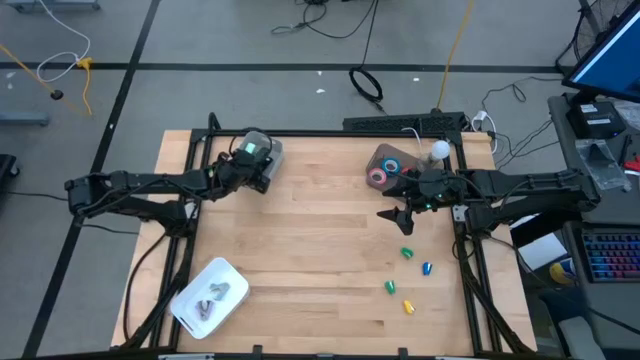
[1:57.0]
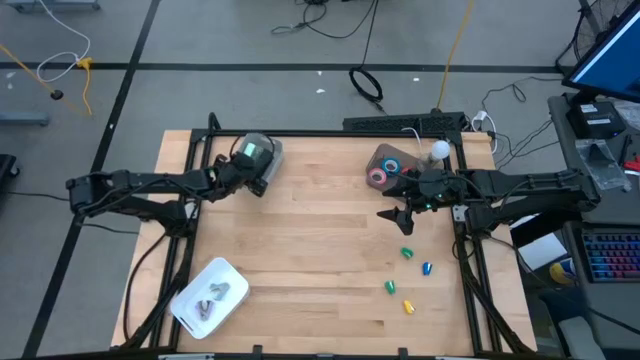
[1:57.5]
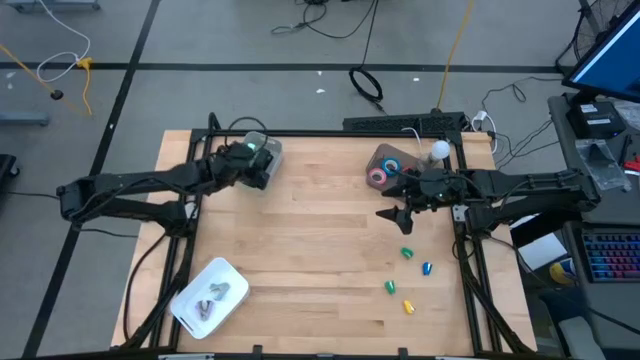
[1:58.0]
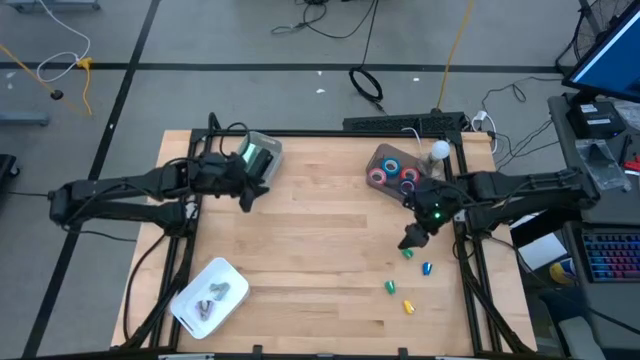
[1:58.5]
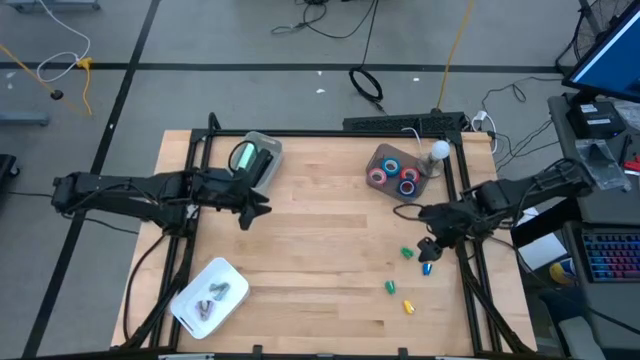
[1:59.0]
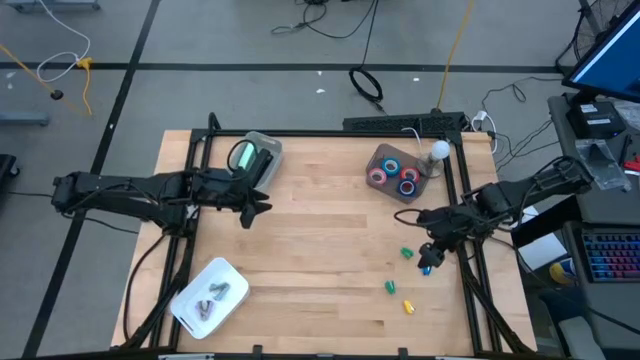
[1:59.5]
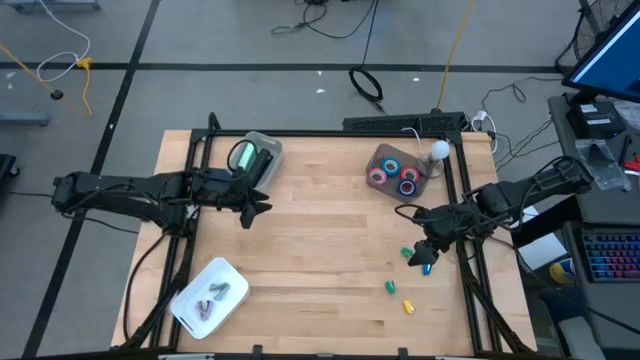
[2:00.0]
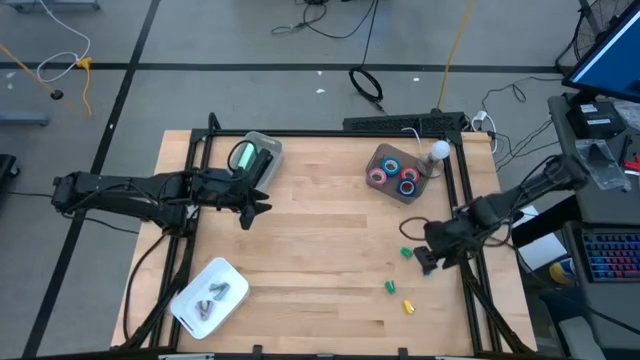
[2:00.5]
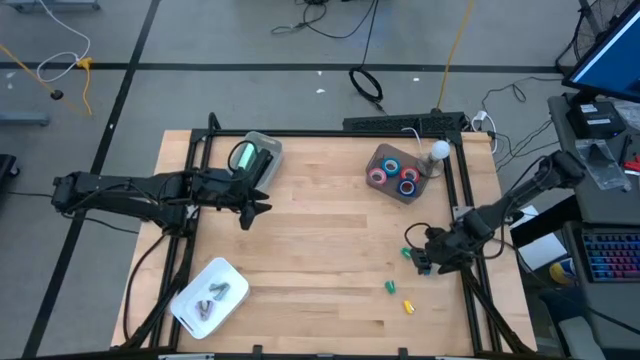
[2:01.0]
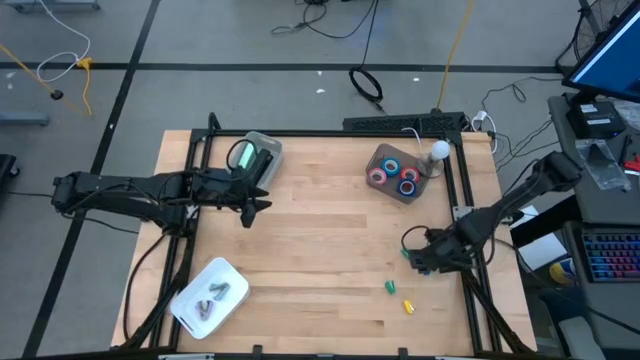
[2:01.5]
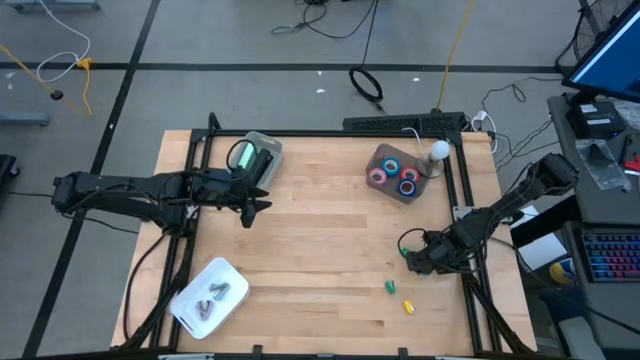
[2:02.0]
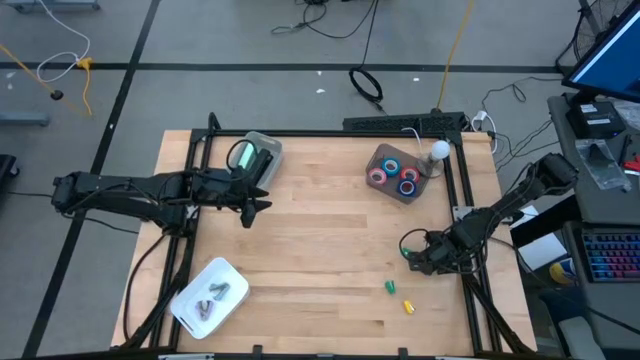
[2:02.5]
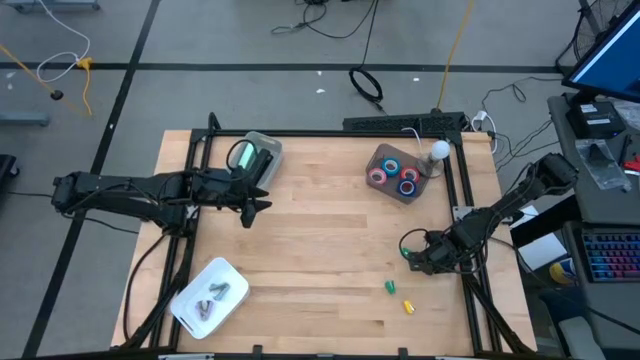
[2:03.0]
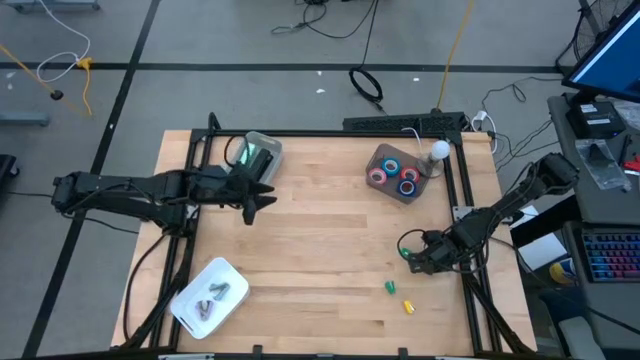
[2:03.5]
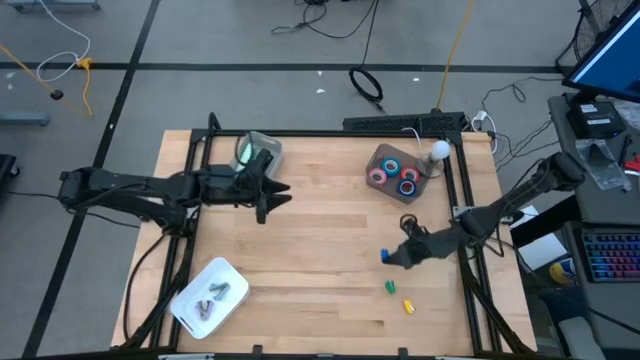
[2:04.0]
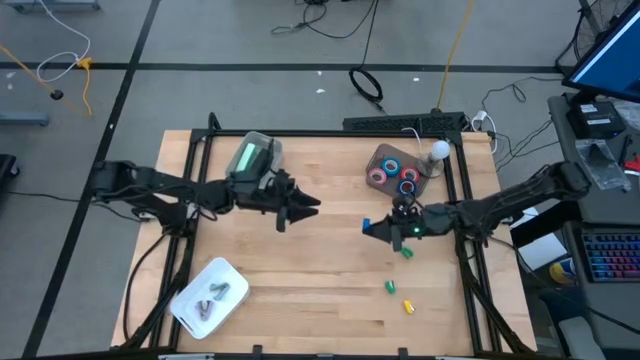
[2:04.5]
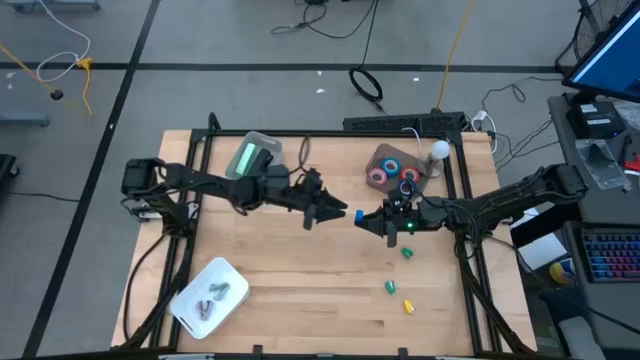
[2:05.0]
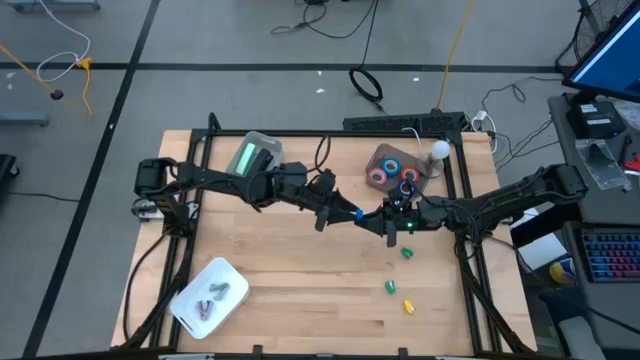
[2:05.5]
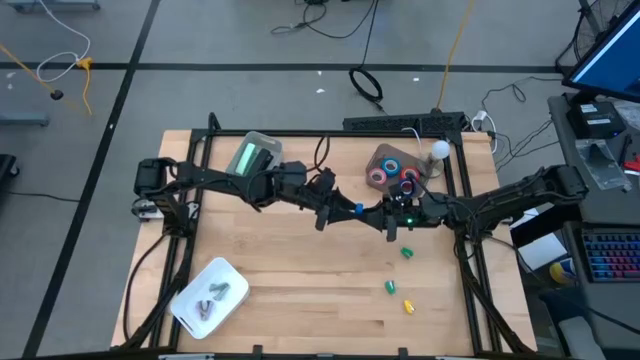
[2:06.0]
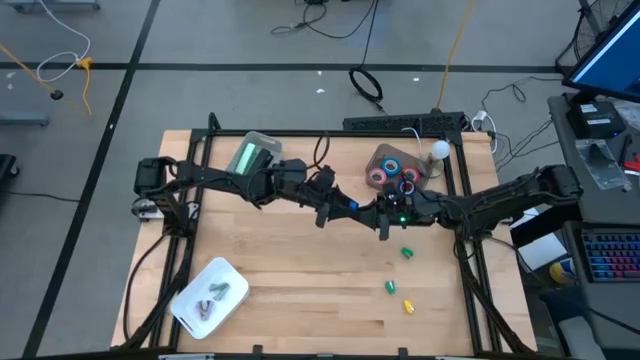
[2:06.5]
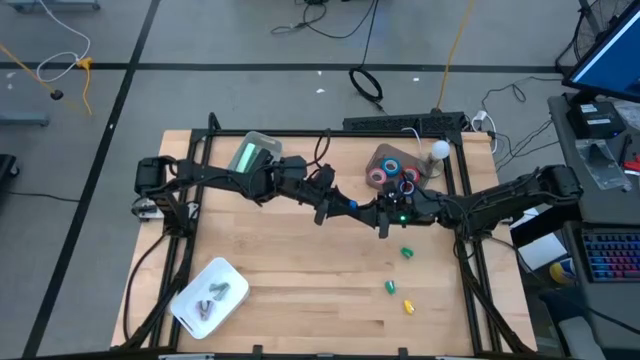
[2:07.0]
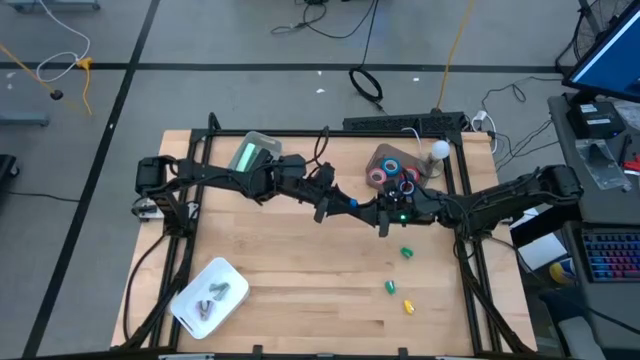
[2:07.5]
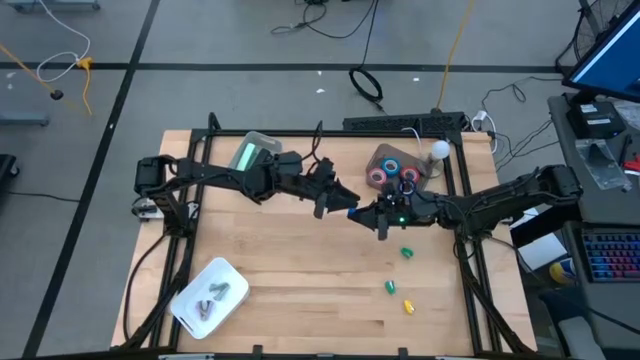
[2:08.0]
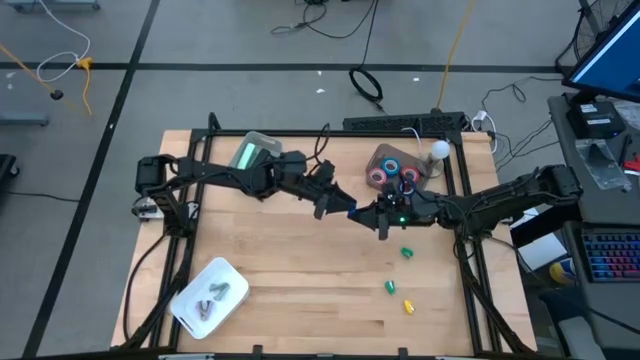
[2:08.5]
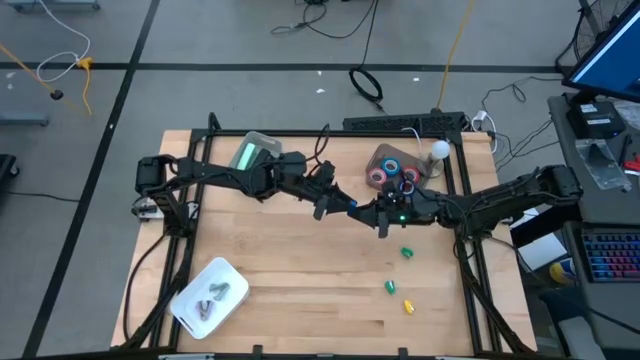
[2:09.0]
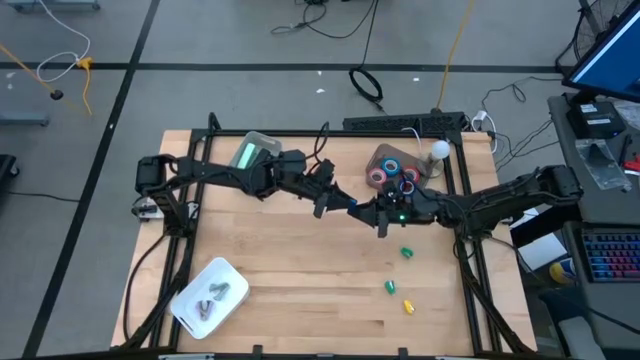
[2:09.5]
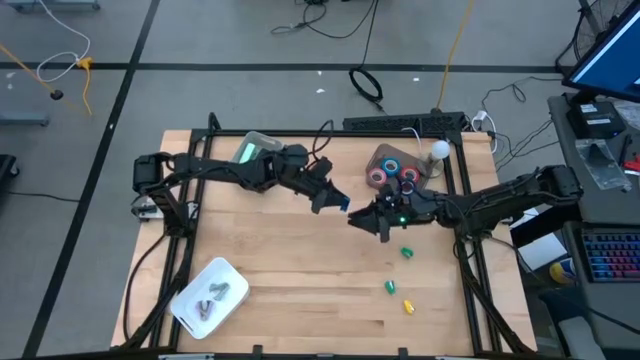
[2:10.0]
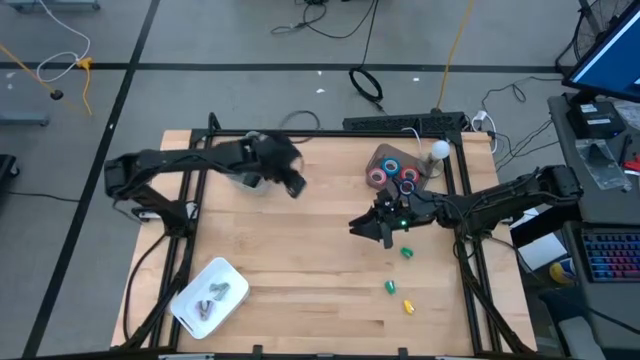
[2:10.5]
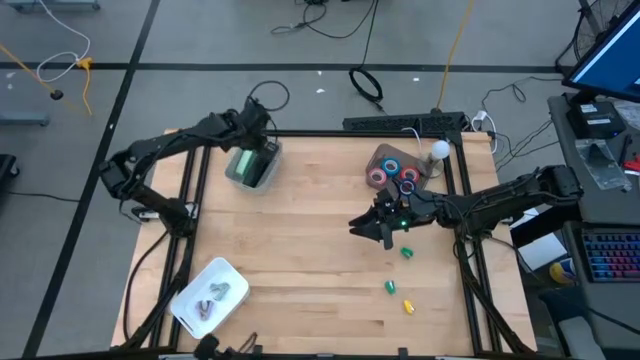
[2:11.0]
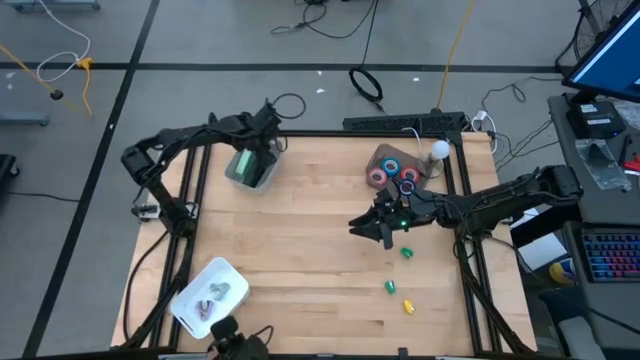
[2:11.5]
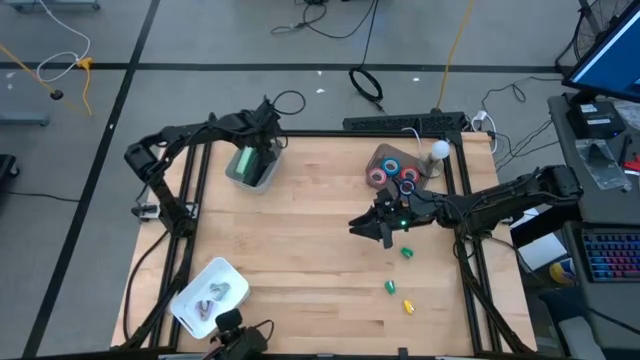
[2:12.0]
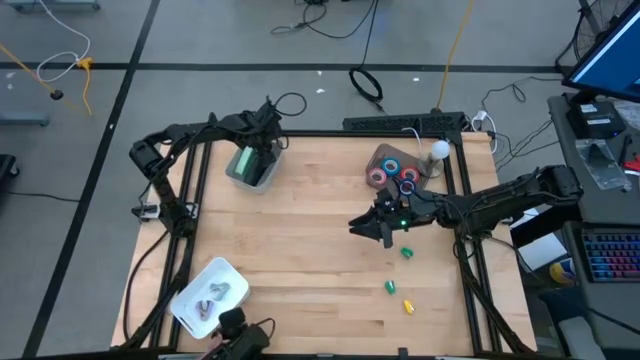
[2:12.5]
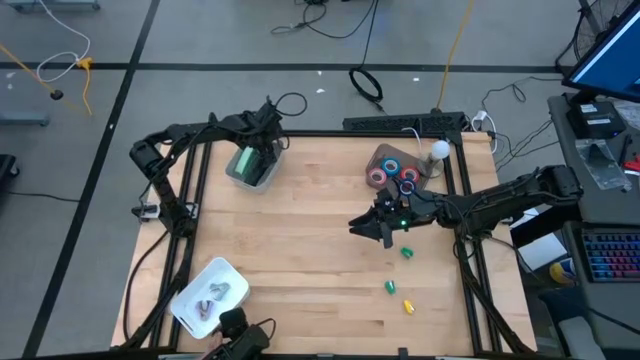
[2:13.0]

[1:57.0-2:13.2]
Task: Pick and place Stapler, Stapler remover, tape
Put the small blue stapler into the gray bin

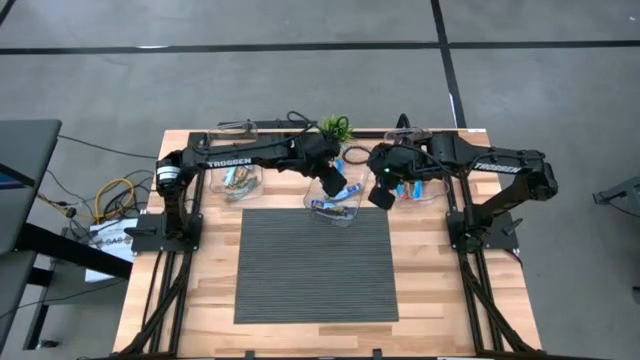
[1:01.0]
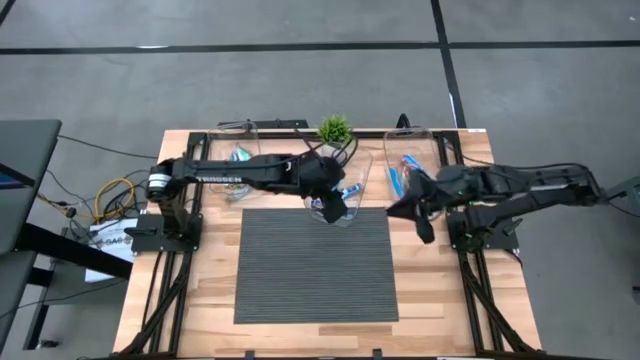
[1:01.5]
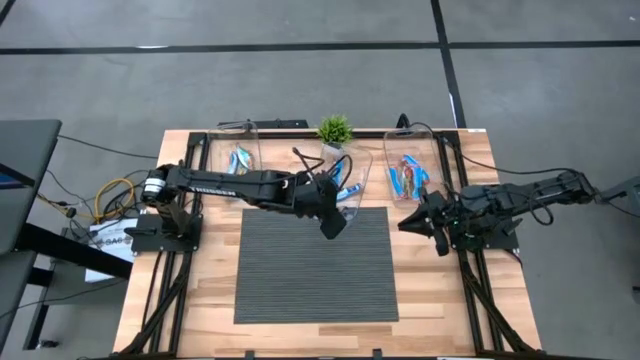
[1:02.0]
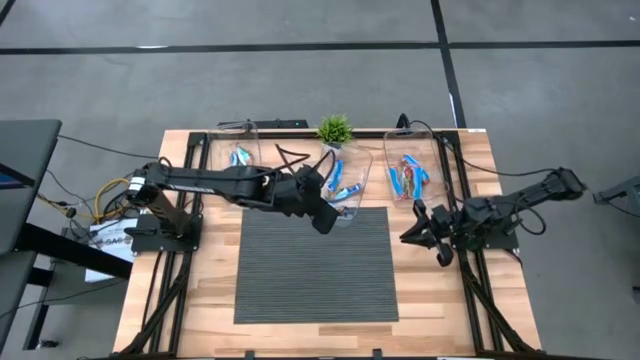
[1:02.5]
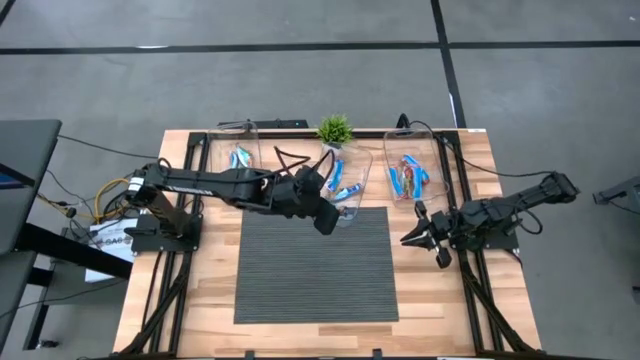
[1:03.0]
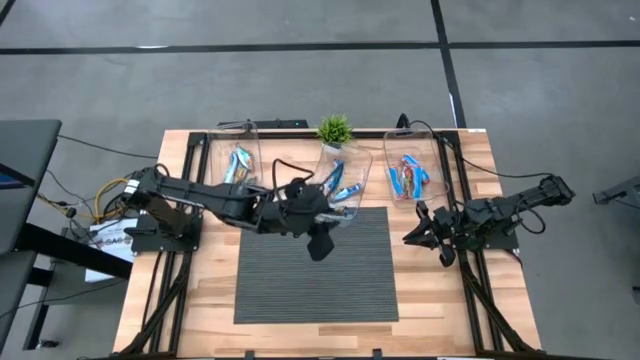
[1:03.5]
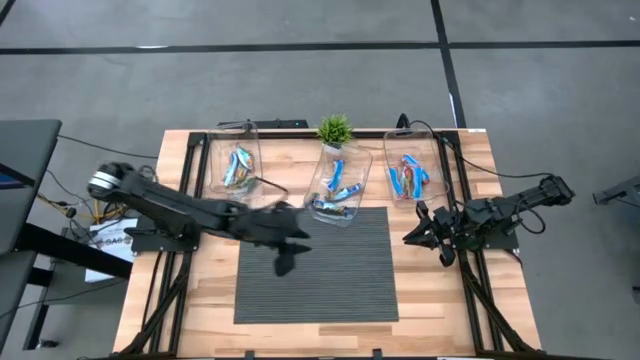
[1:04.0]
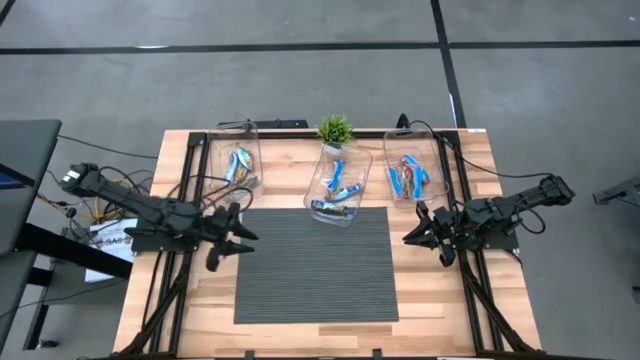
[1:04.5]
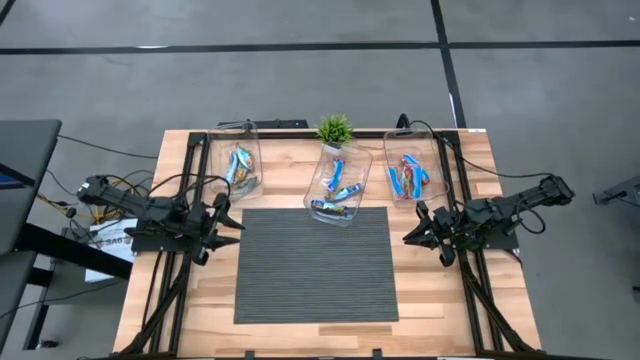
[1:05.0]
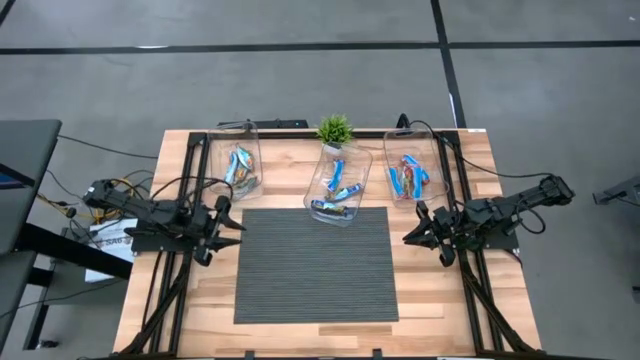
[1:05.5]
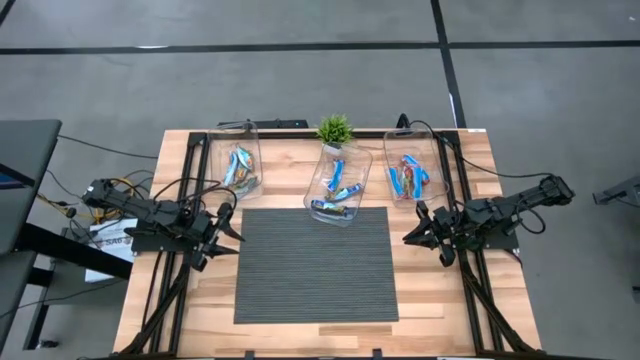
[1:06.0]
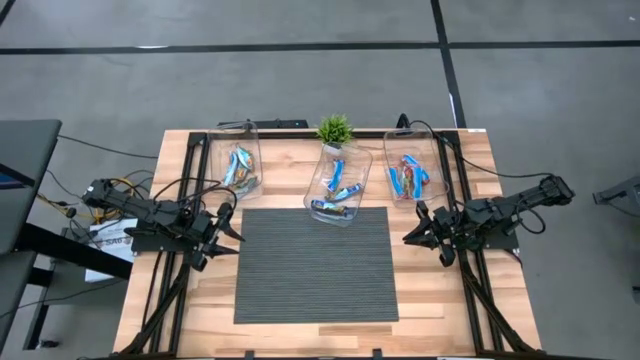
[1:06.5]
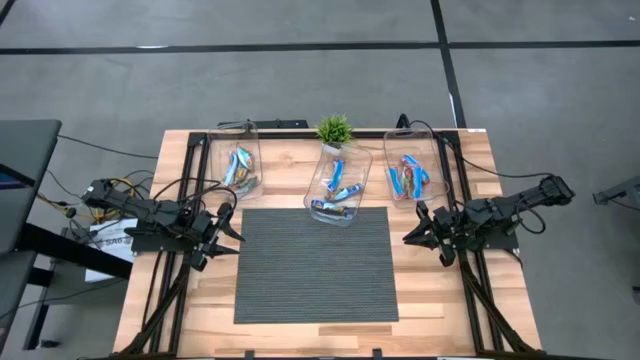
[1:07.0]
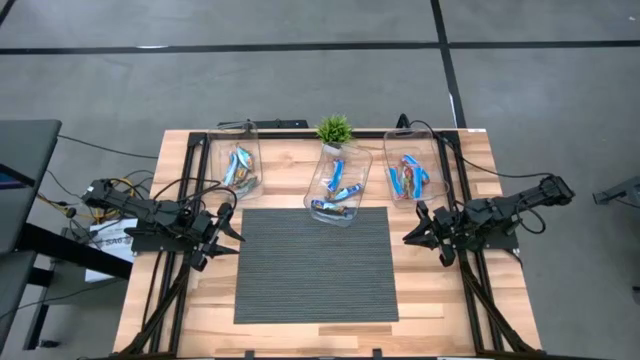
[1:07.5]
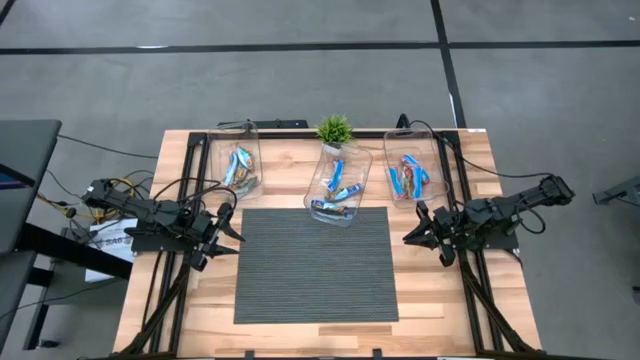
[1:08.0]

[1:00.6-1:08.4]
Task: Pick and place Granola Bars by type
Return to Home Position
